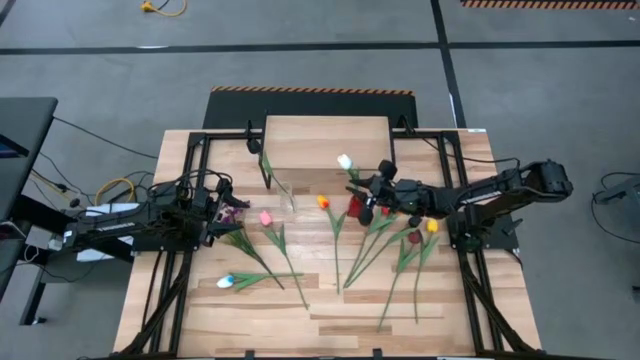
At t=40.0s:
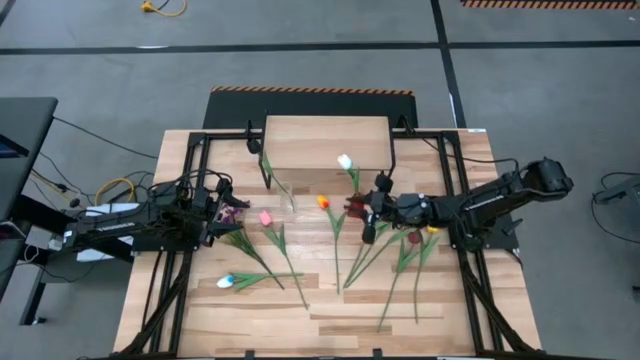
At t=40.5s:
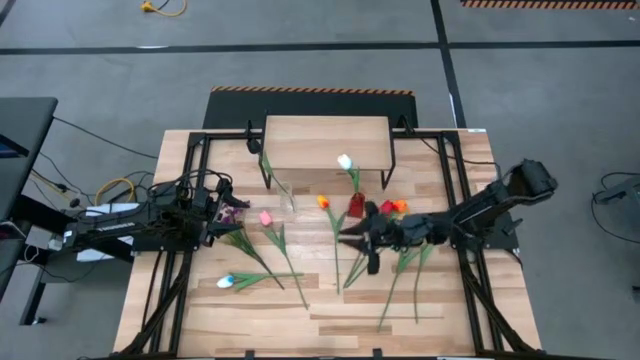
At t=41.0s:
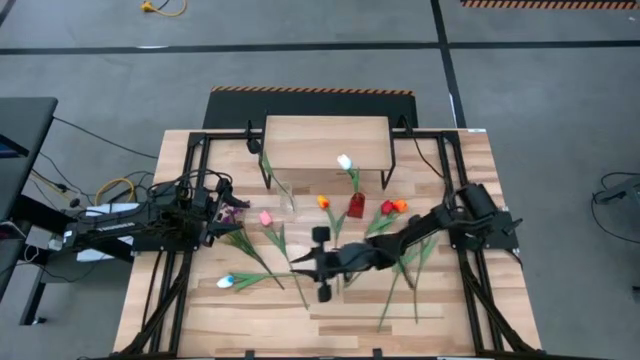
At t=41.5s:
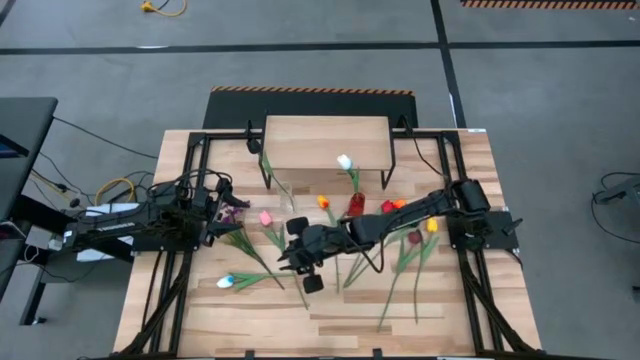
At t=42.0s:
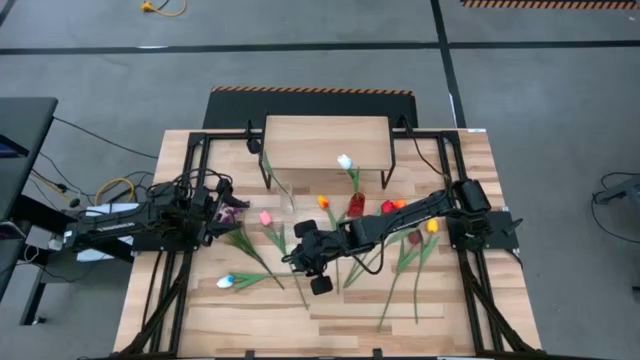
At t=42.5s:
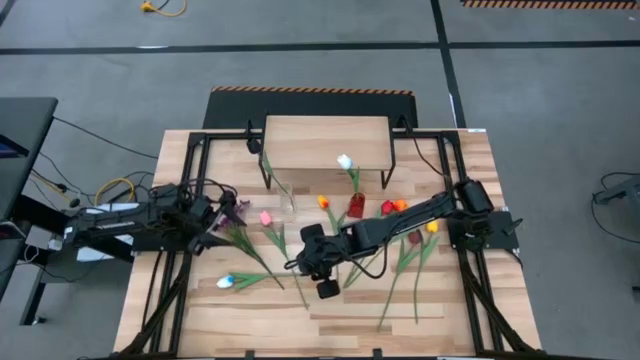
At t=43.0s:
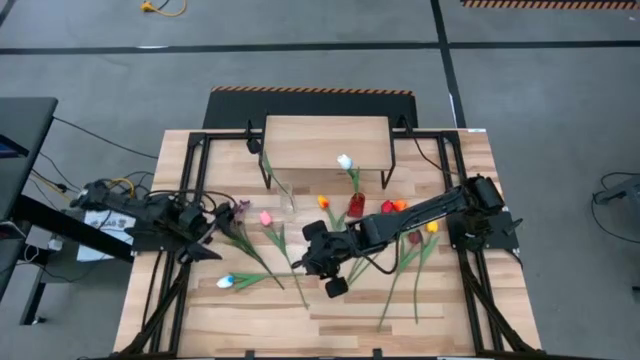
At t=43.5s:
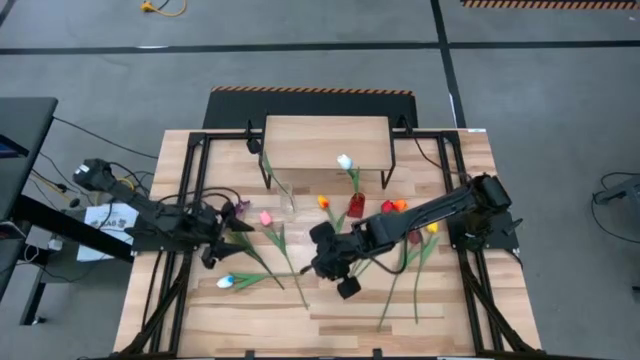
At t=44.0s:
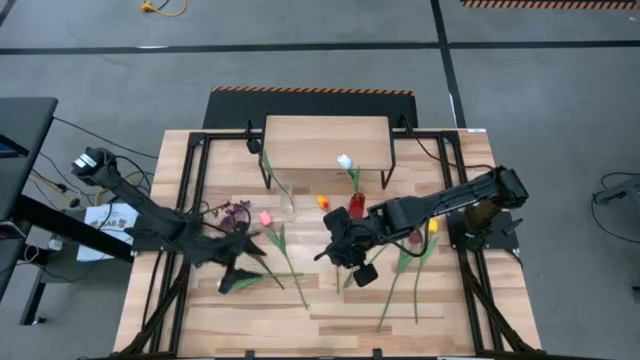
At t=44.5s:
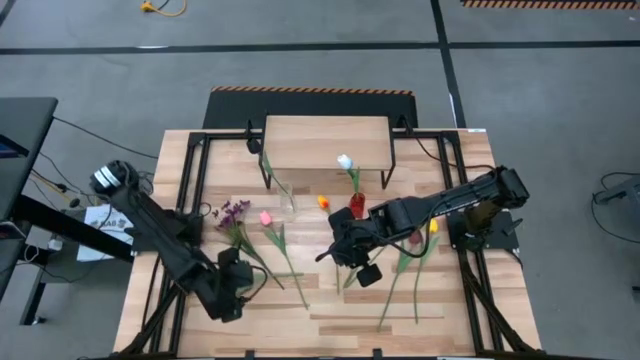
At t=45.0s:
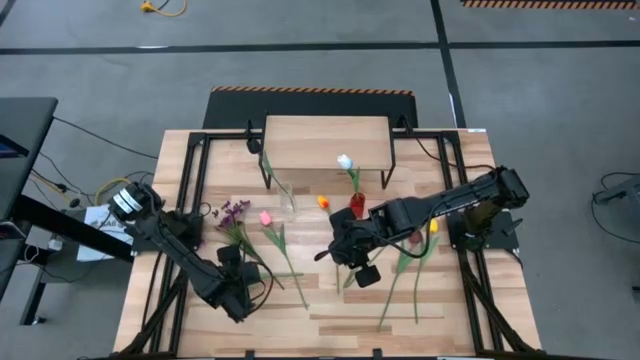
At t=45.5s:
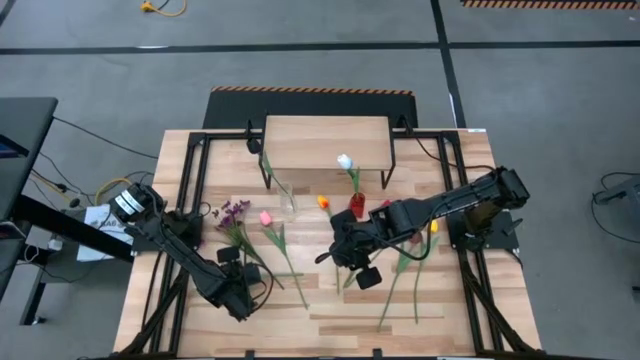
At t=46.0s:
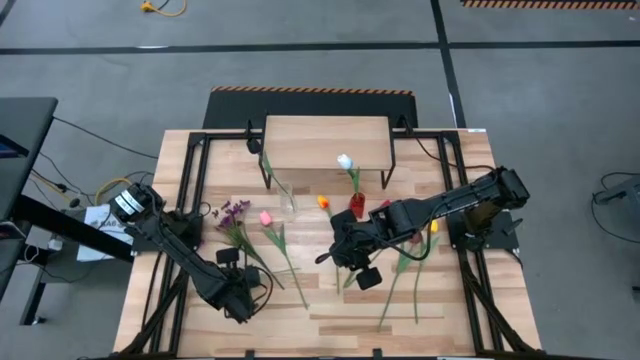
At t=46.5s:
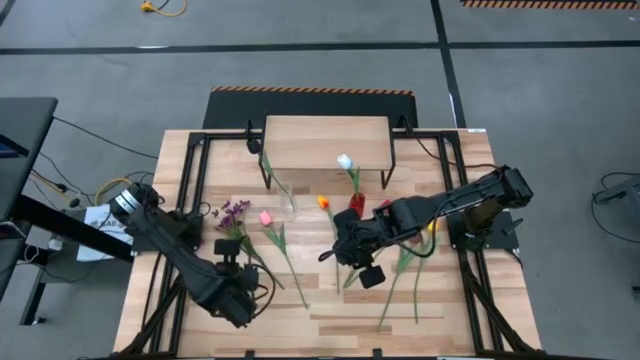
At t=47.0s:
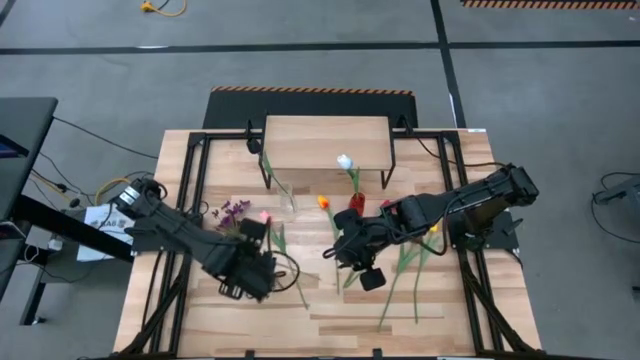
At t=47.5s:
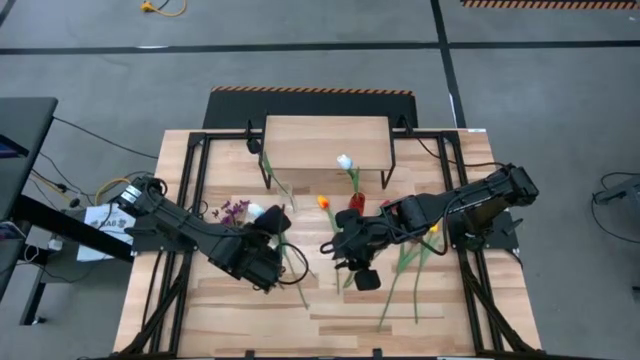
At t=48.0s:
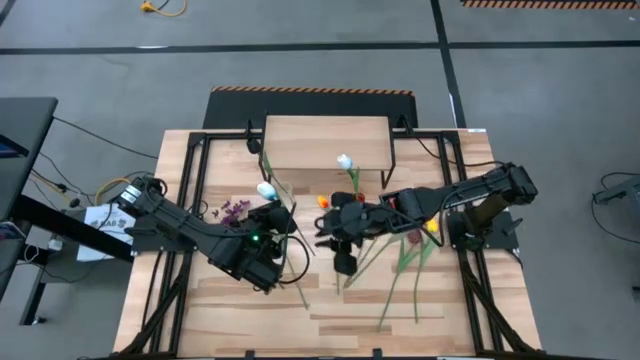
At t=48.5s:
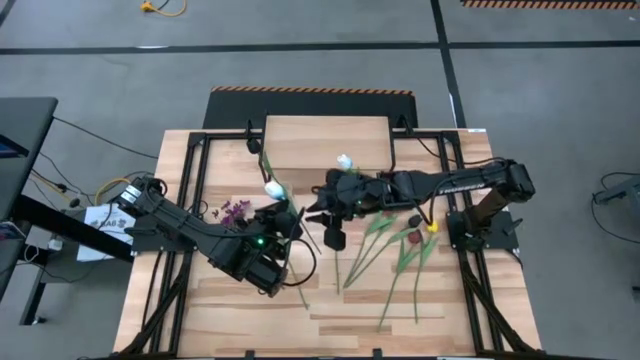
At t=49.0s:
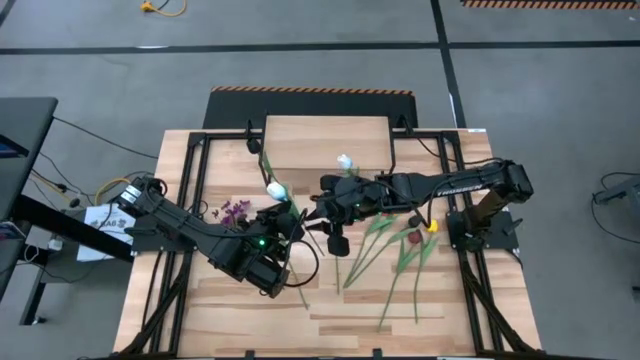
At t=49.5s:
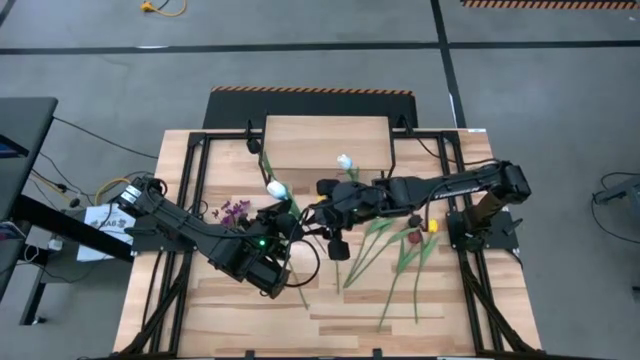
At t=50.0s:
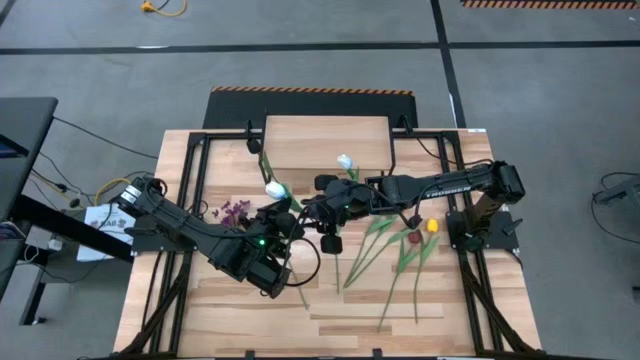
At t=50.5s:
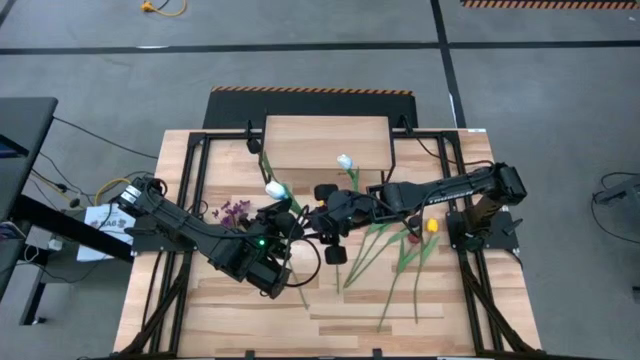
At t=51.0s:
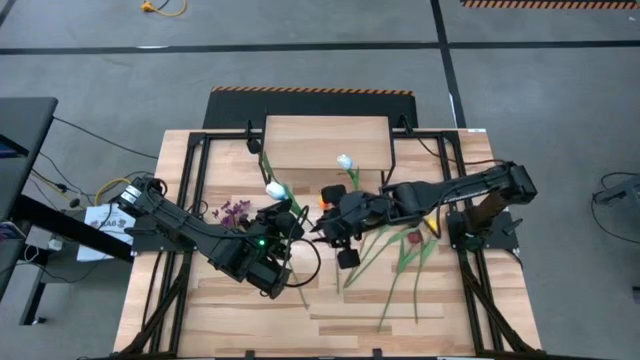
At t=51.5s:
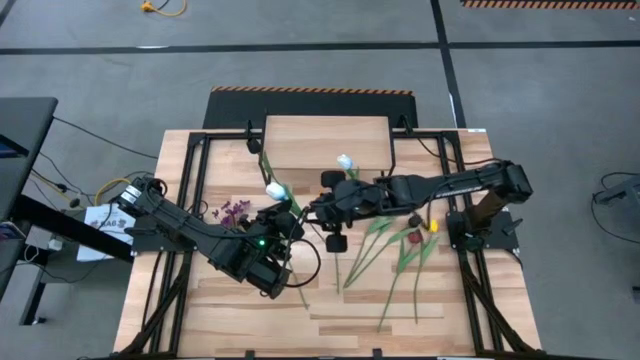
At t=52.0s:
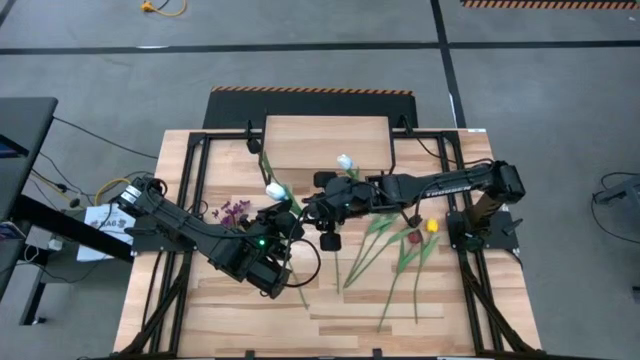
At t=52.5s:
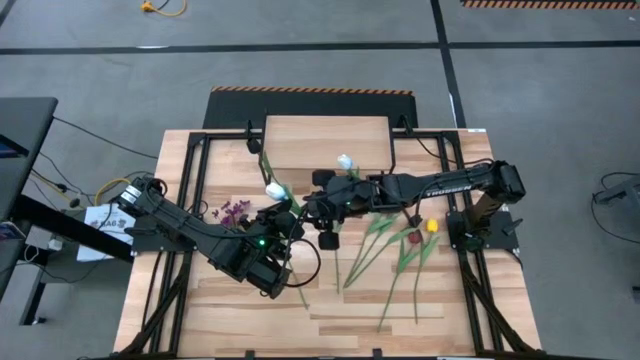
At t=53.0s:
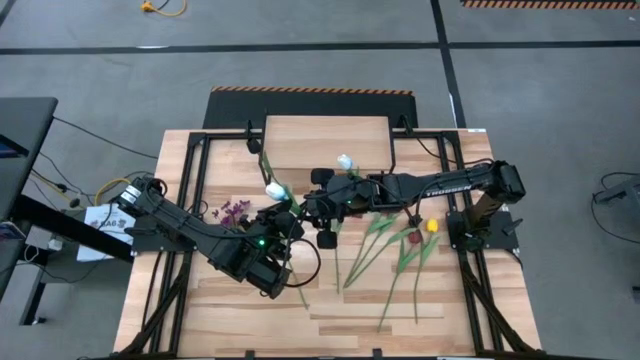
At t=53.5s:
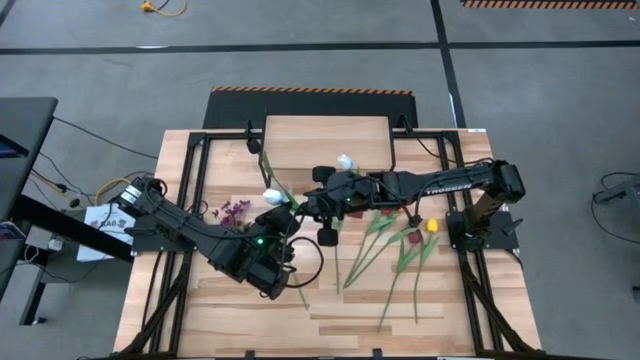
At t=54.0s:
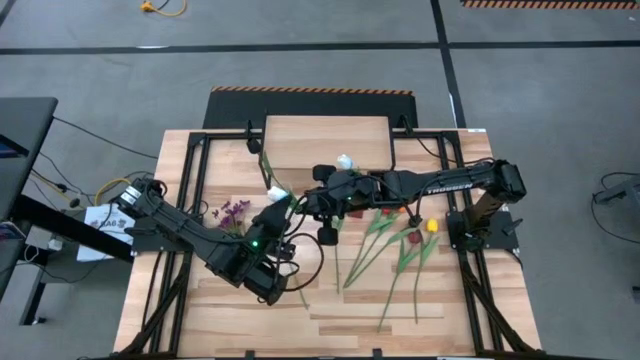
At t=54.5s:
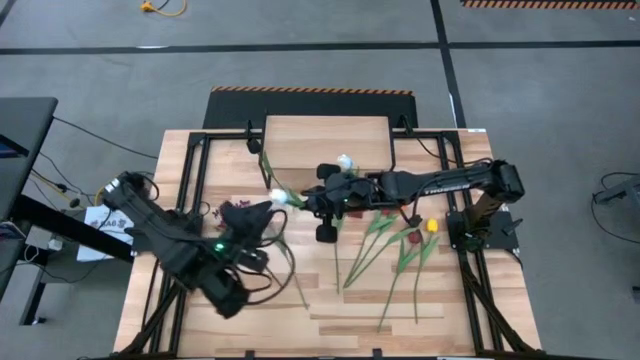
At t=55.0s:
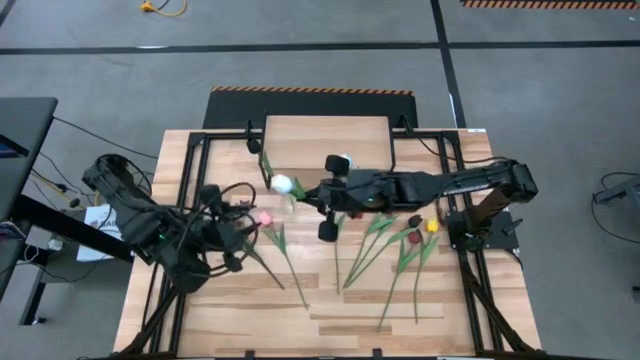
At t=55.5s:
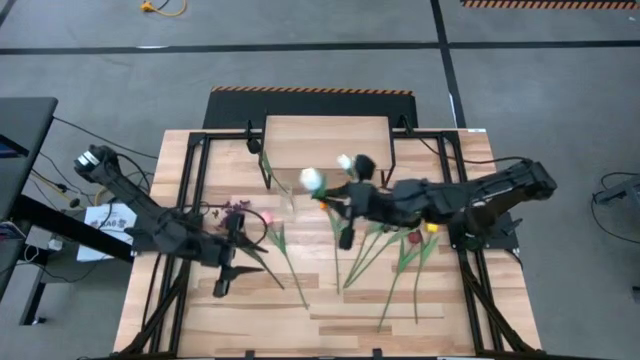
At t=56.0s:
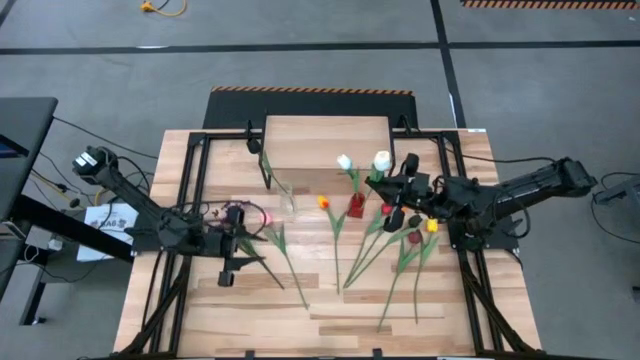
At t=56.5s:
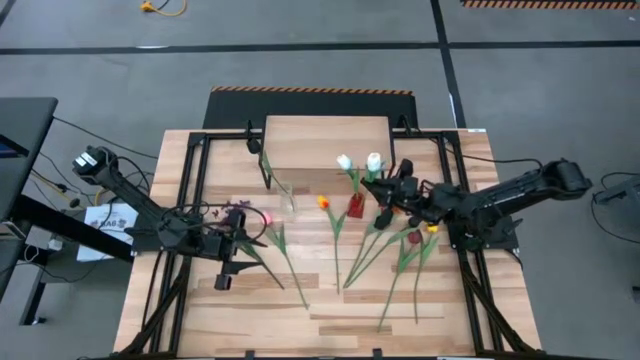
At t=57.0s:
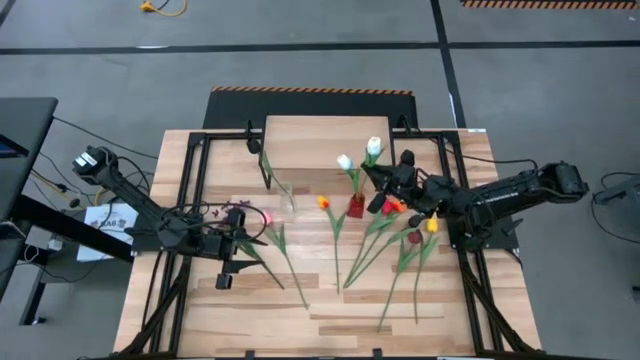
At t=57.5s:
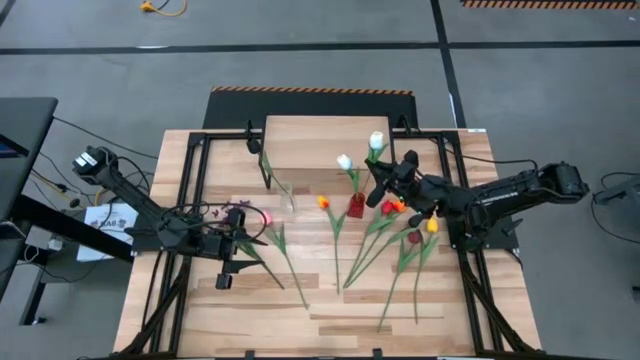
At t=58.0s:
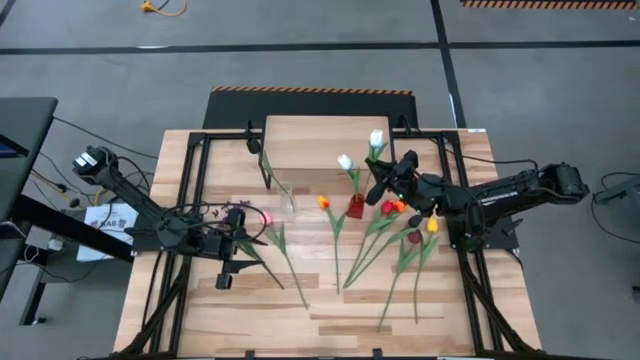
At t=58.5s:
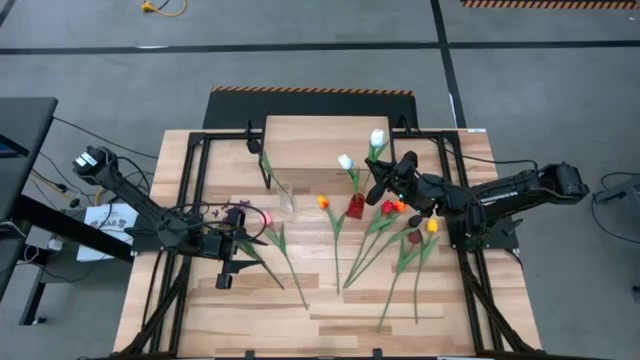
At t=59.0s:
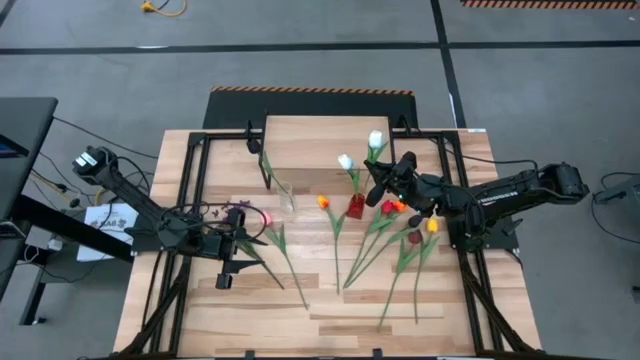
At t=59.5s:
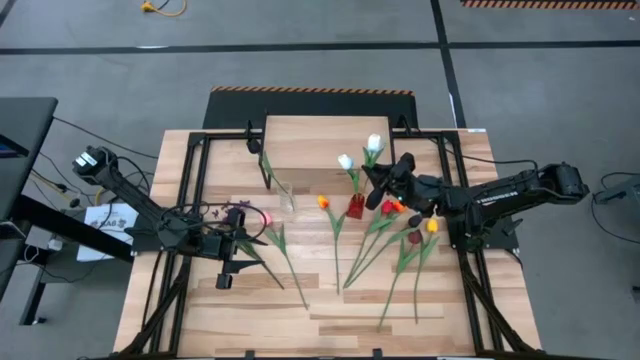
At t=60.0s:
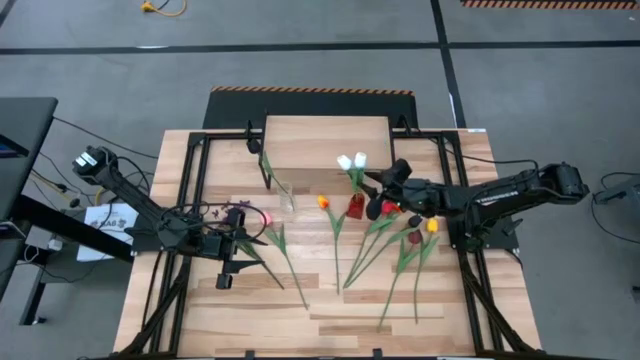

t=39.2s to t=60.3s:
Task: Pick and place flowers into a vace then onto a shelf
Put the white flower into the red vase

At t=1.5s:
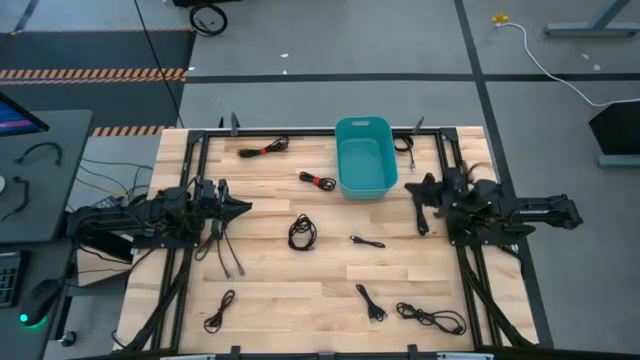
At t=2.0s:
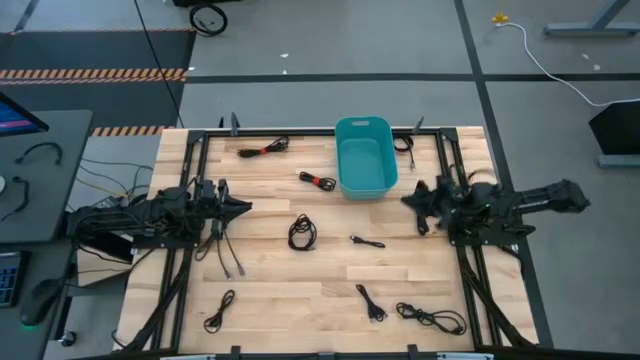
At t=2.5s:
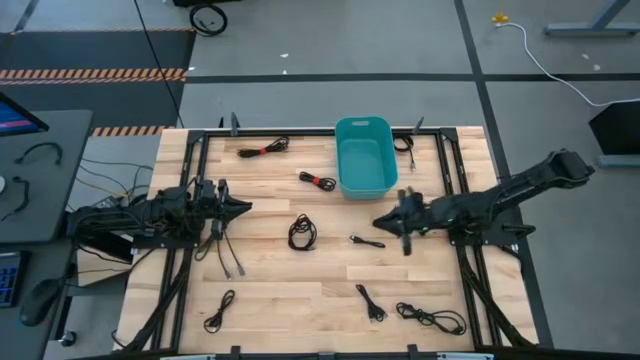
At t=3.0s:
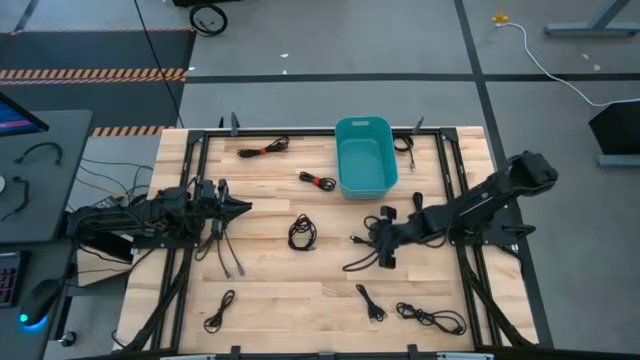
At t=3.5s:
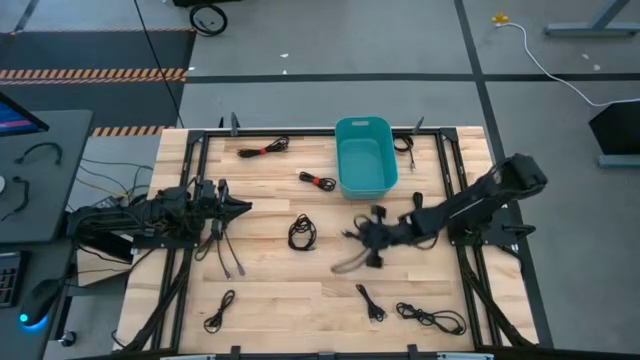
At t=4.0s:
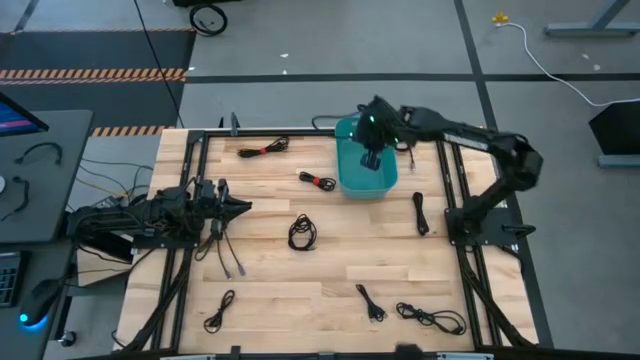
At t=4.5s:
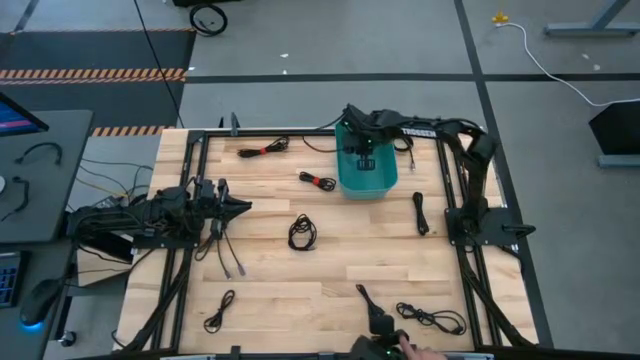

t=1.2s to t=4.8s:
Task: Pick and place USB-C Cables
Put the black charger cable into the green bin
